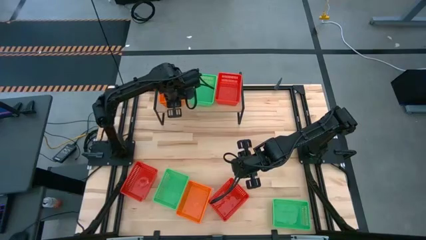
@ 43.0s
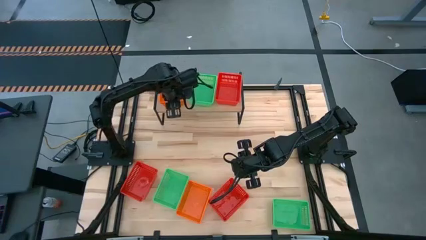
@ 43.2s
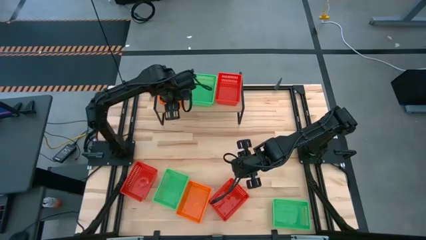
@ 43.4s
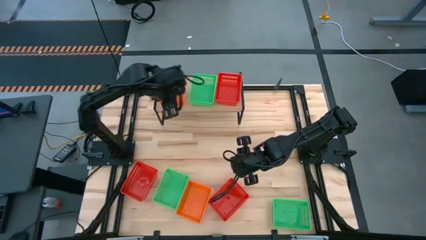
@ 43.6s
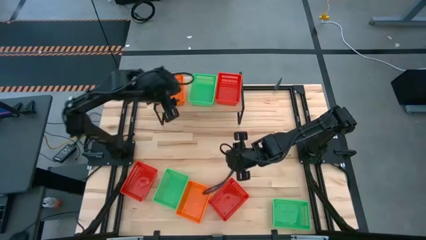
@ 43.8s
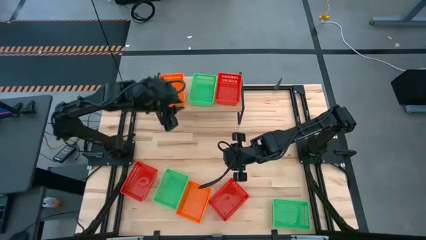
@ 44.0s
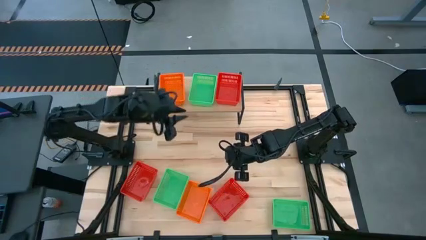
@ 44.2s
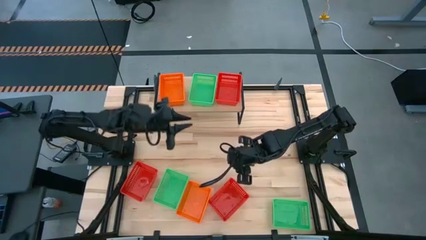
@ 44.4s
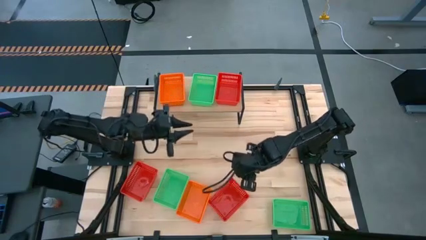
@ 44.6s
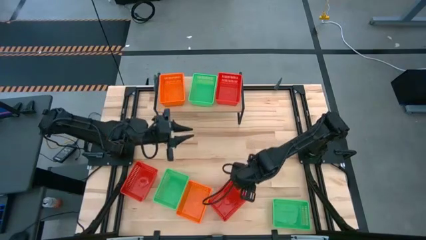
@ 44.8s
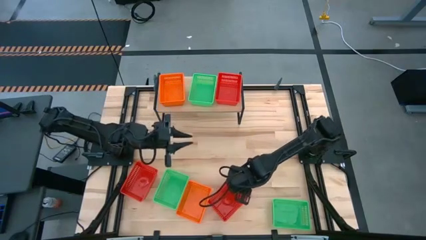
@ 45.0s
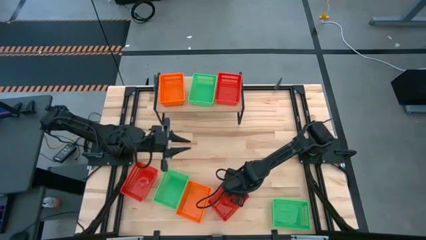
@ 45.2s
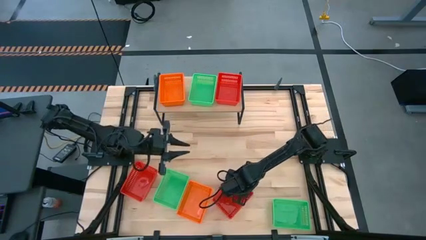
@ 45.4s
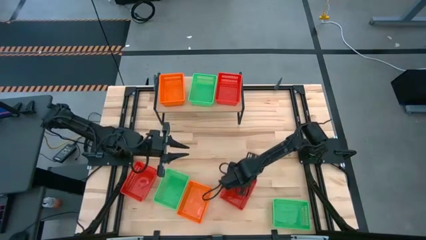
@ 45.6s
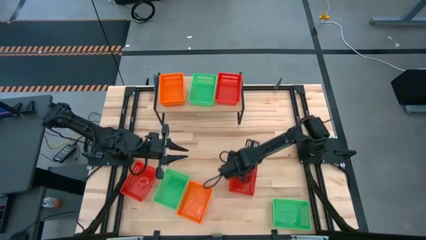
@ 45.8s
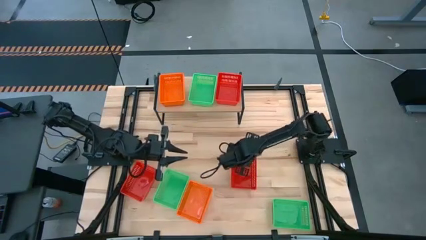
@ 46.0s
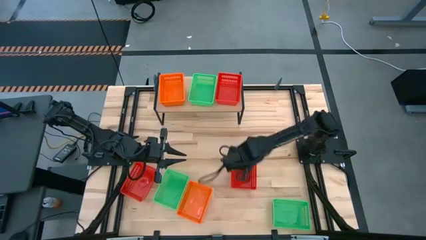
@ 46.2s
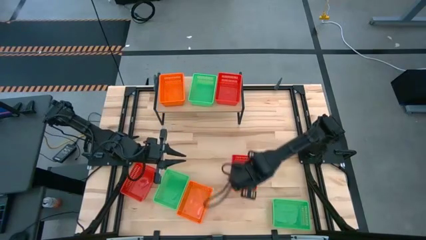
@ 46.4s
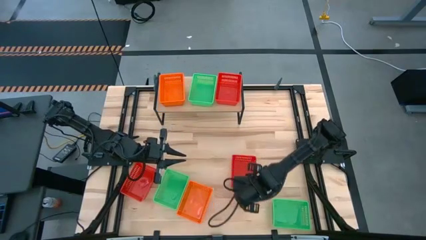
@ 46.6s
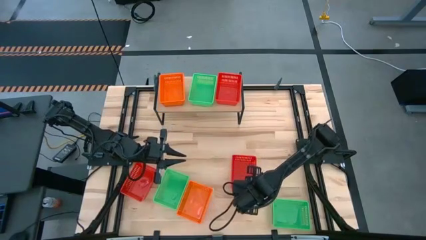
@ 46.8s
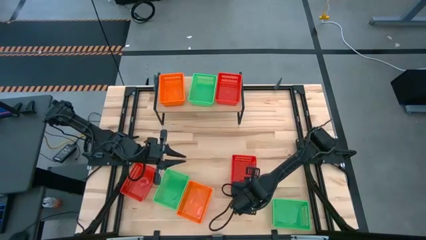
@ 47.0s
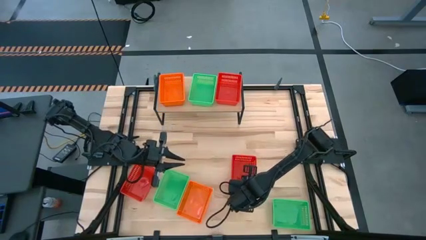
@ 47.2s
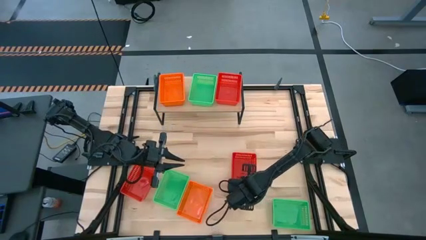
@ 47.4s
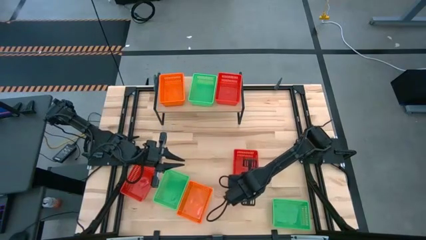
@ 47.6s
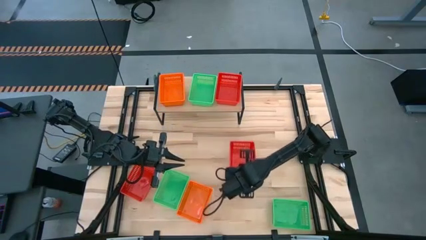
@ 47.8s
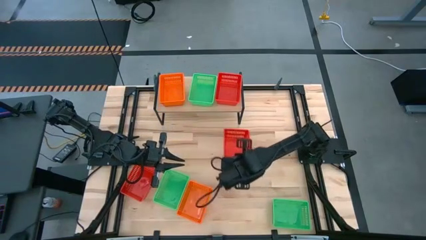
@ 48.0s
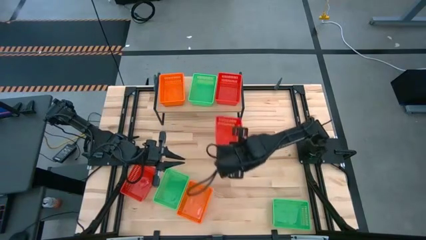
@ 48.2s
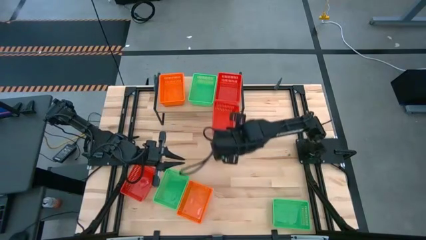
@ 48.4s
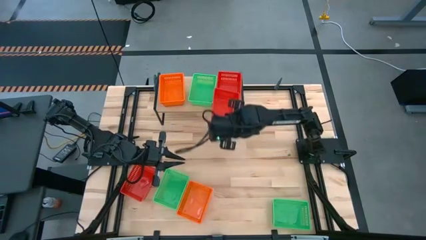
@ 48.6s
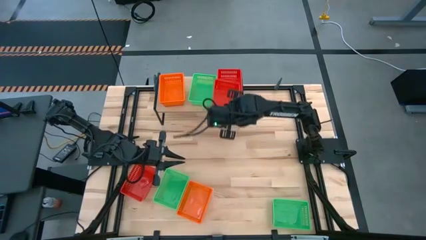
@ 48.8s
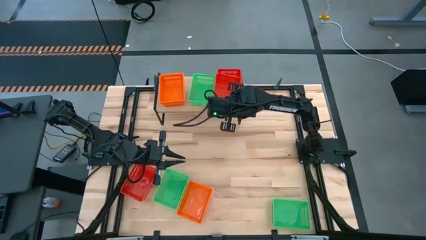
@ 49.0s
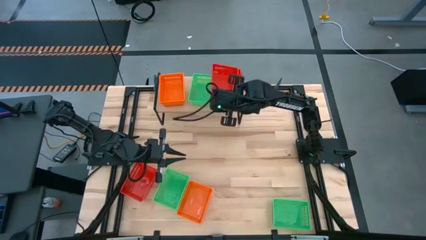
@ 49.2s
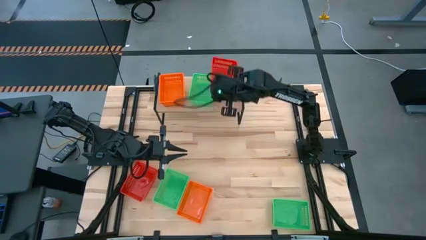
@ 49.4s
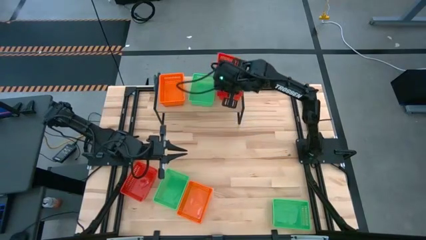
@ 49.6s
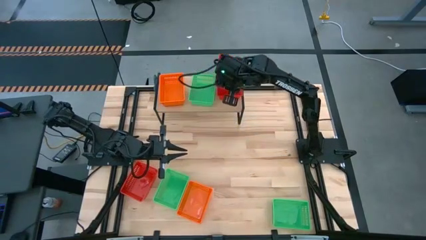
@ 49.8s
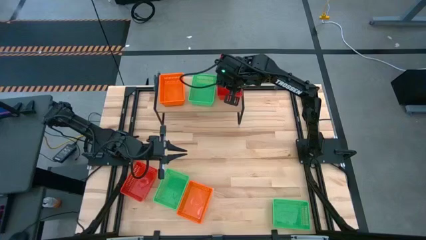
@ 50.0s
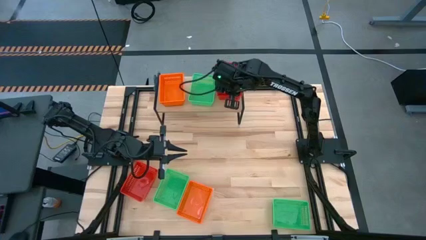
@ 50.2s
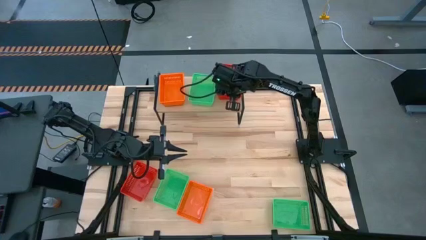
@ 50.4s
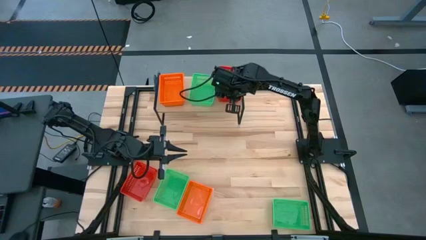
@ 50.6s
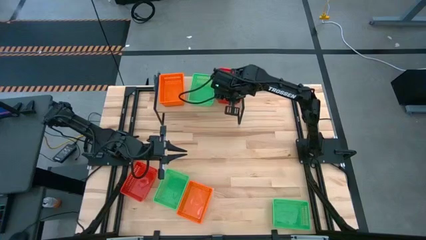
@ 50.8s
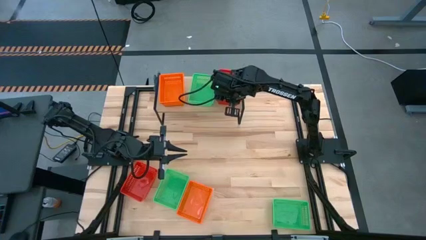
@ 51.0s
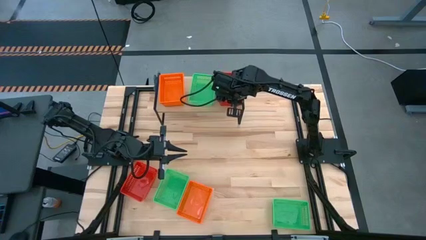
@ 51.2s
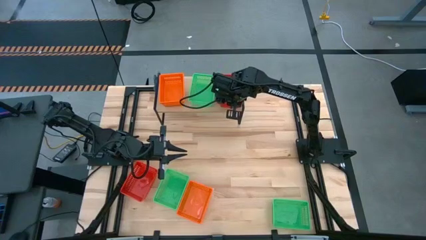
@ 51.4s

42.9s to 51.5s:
Task: Stack baskets on shelf by color
Stack the right red bin on the red bin on the shelf

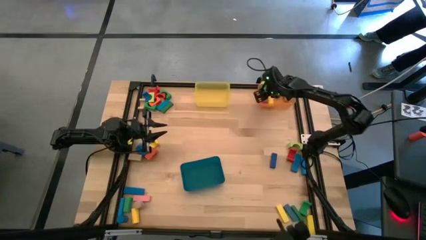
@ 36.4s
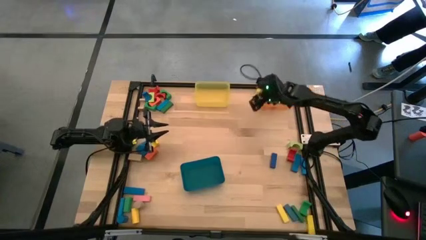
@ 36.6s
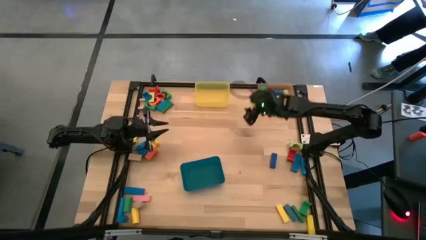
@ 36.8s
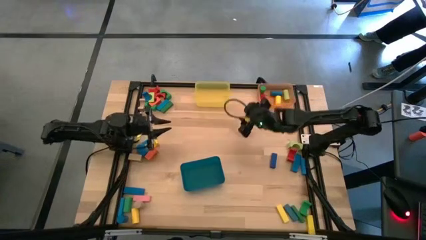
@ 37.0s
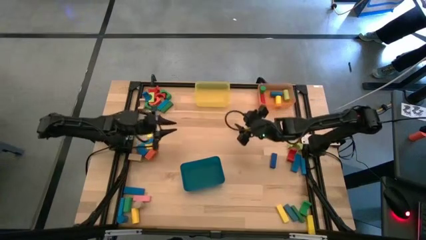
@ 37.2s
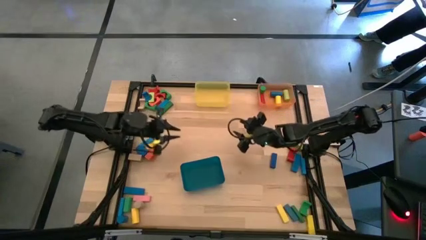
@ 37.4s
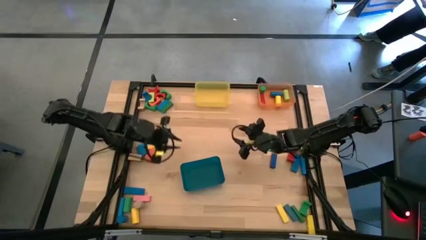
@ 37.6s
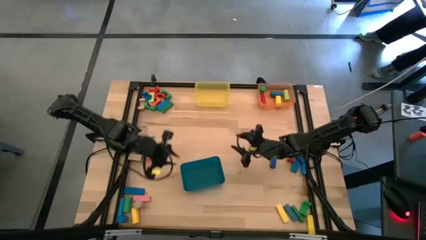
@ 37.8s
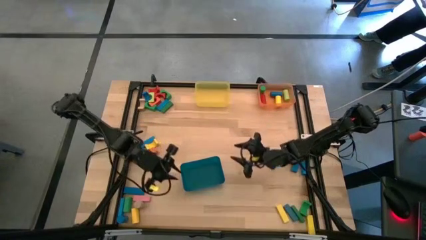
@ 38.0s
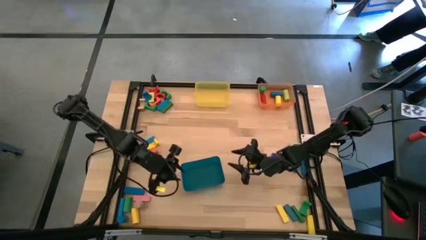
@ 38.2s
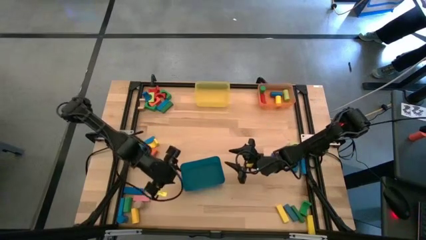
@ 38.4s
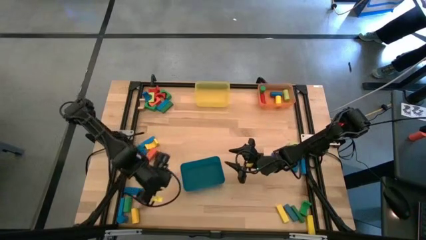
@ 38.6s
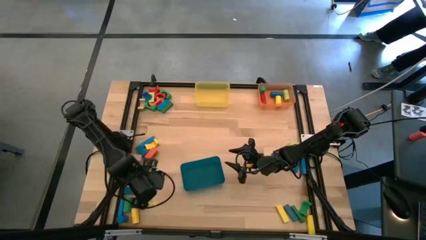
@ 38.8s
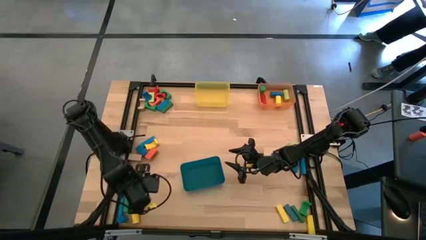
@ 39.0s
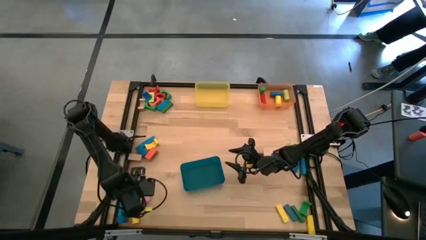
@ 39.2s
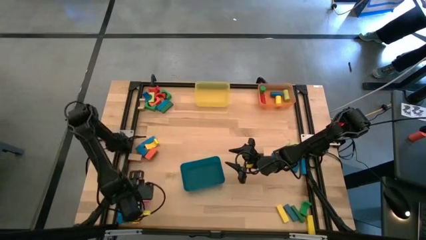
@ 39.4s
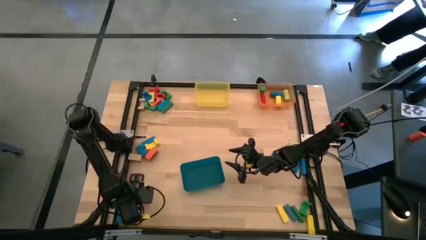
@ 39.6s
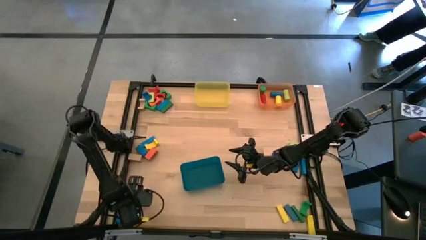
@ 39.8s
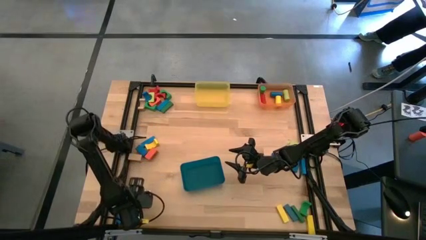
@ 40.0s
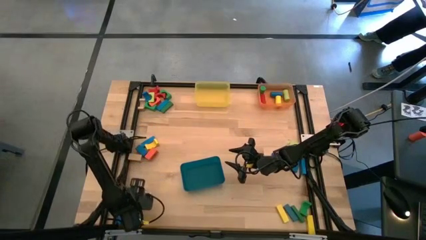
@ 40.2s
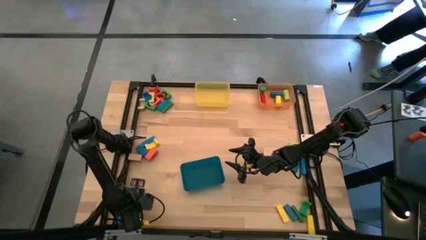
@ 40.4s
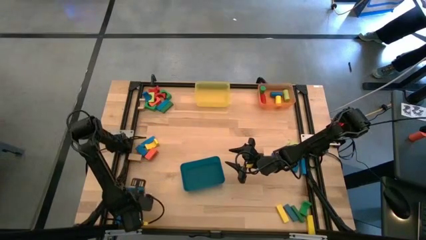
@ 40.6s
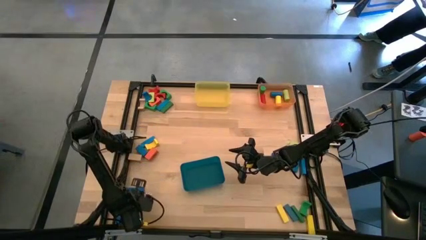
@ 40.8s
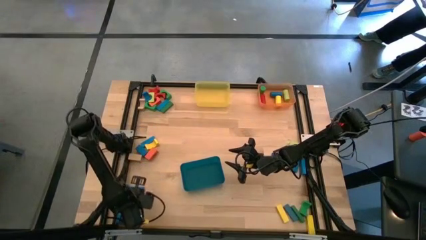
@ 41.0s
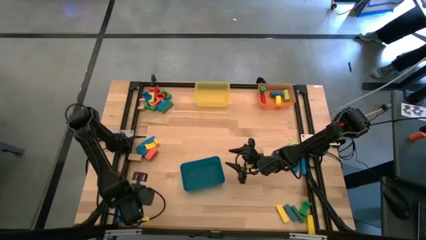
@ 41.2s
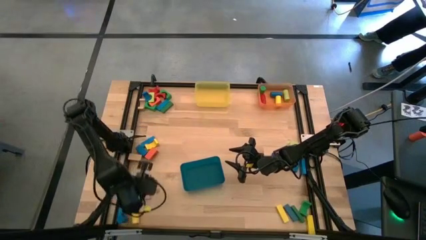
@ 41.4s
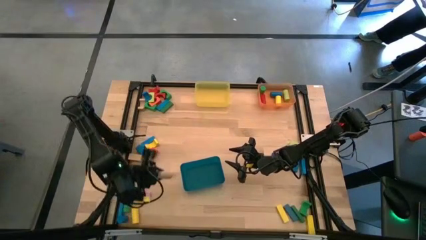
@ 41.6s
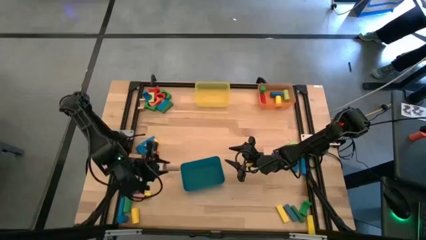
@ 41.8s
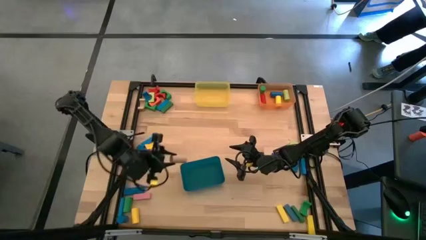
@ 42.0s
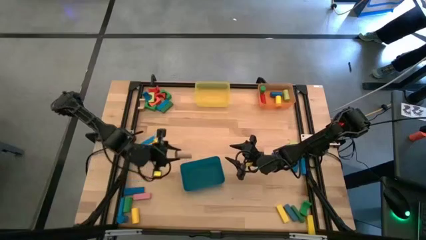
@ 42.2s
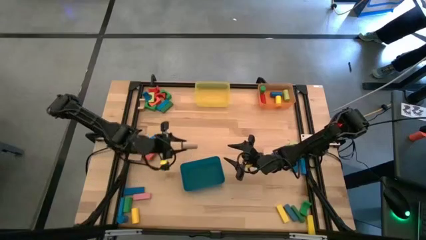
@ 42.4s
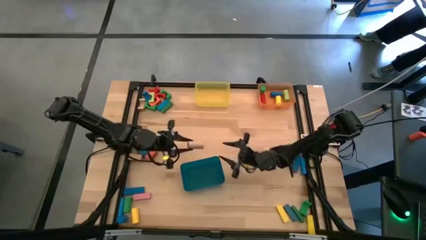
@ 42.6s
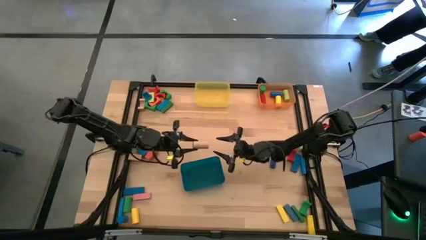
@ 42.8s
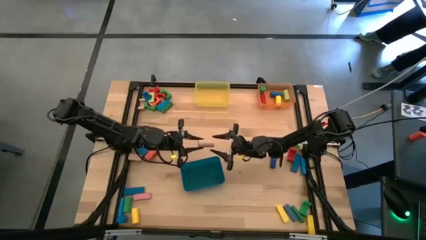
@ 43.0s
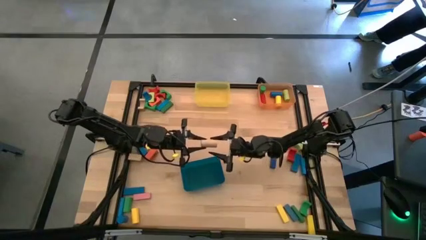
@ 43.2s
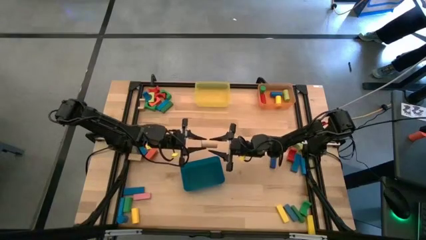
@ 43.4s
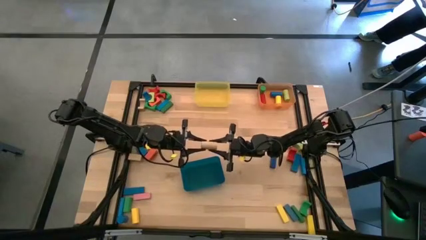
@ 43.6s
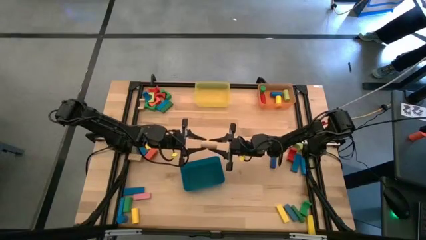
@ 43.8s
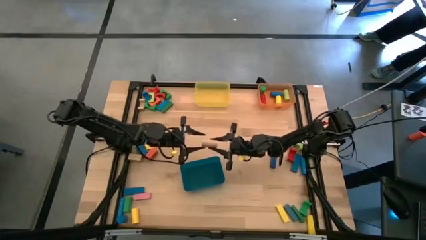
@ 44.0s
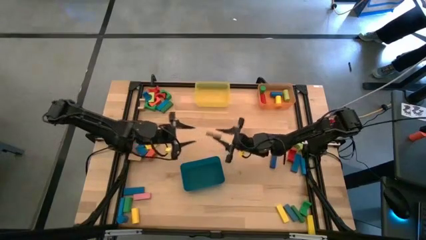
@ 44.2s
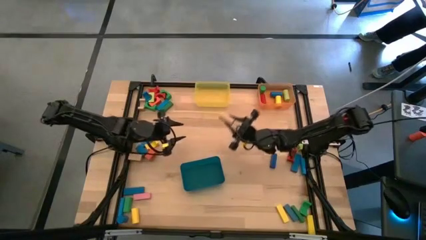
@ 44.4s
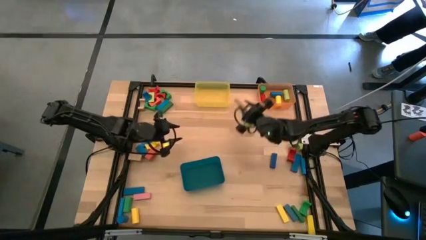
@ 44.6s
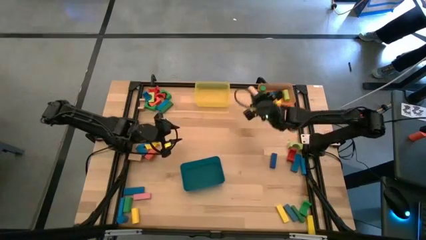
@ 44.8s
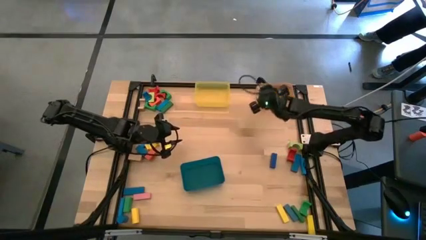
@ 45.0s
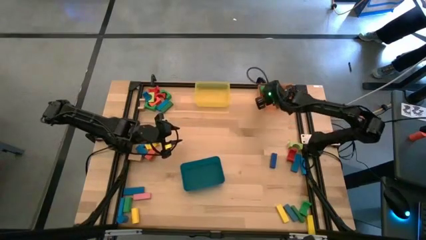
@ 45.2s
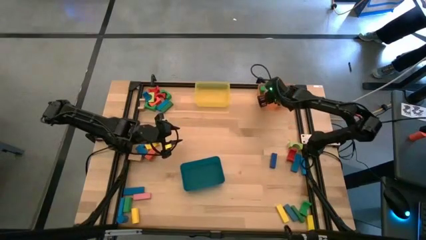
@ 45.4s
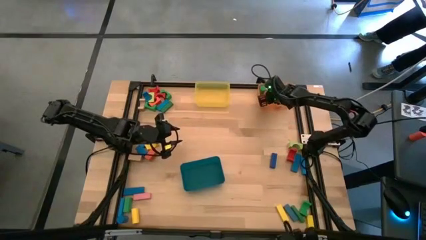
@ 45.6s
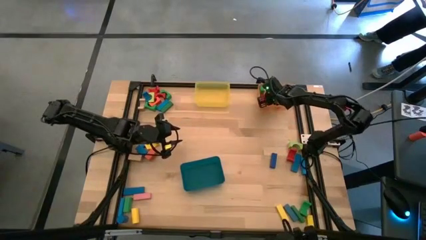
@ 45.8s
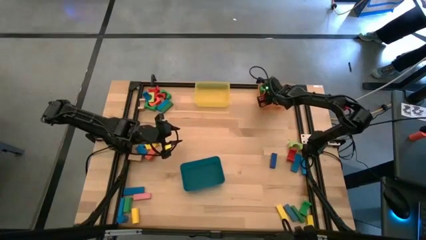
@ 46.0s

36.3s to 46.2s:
Task: Sort blocks by size
Put the brown cylindrical block into the orange bin
